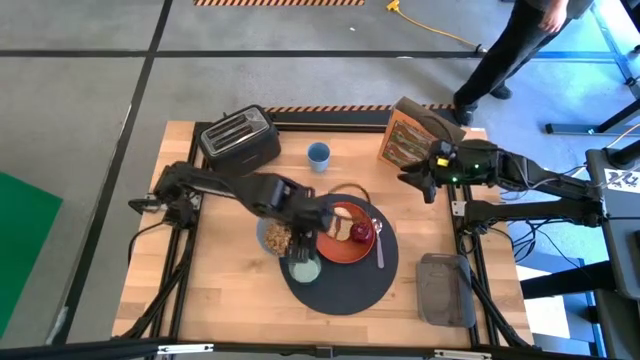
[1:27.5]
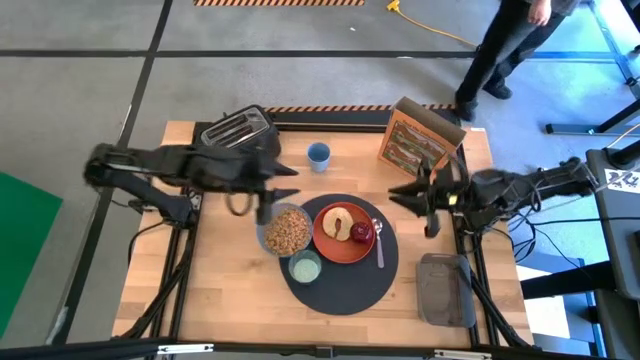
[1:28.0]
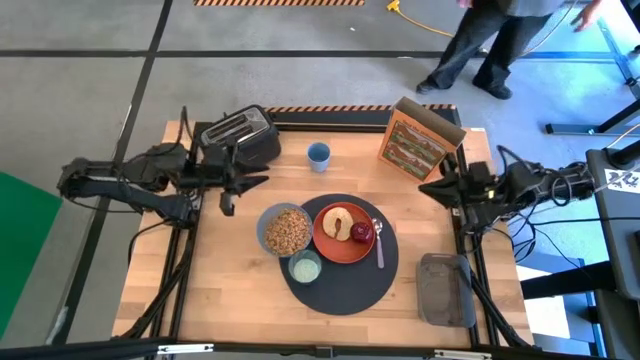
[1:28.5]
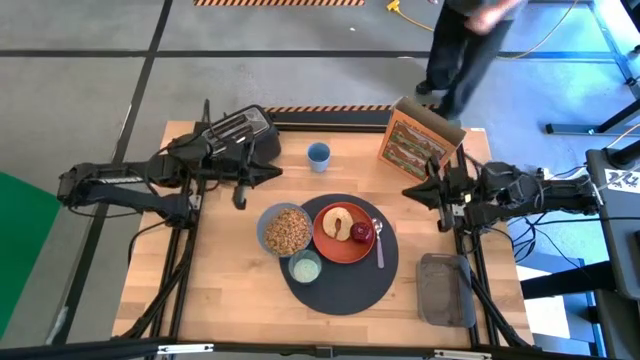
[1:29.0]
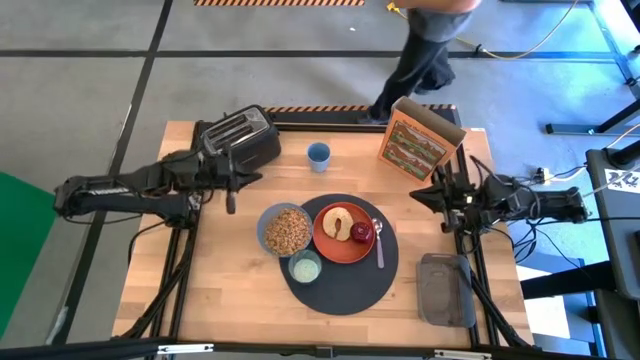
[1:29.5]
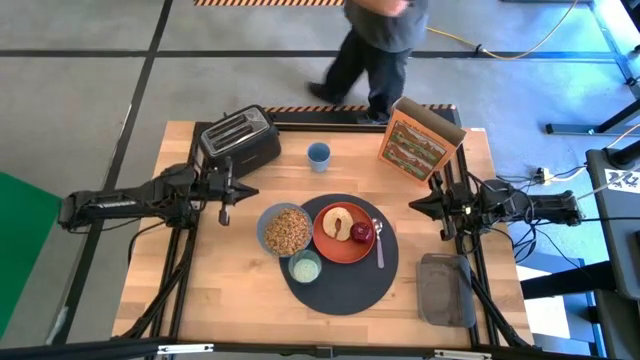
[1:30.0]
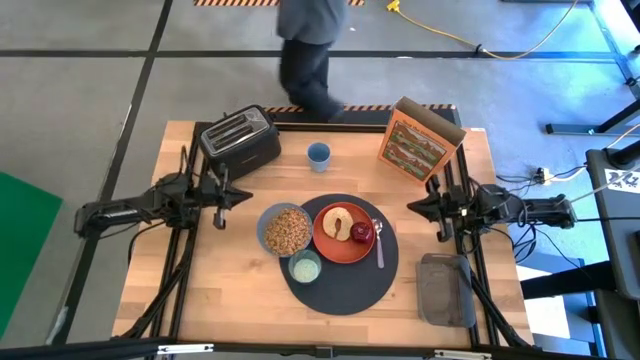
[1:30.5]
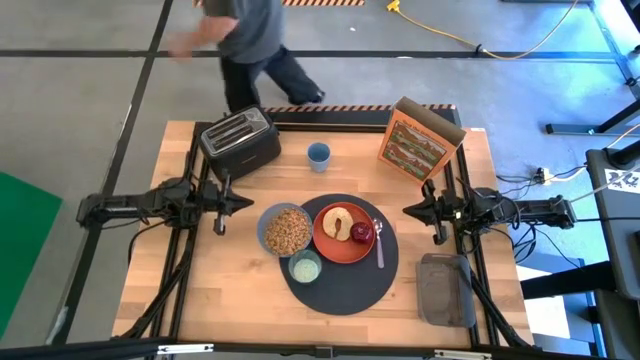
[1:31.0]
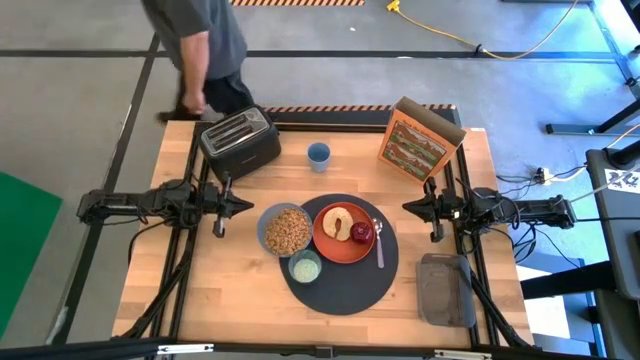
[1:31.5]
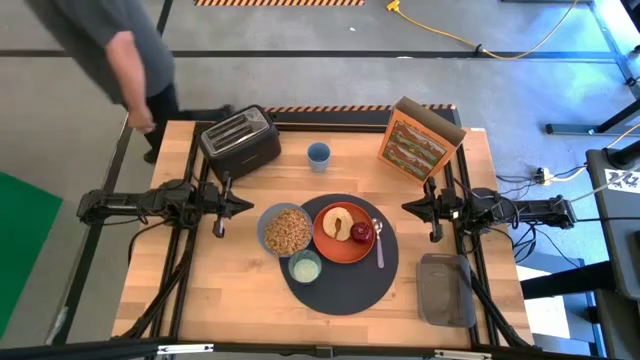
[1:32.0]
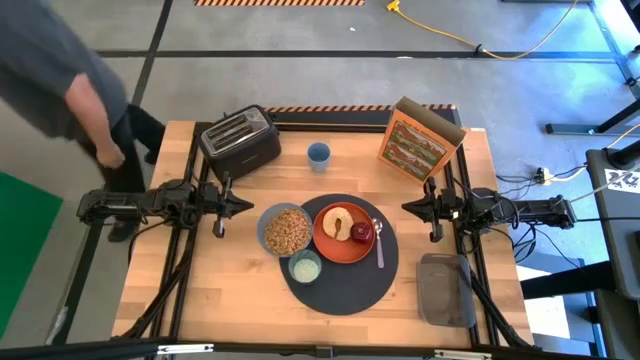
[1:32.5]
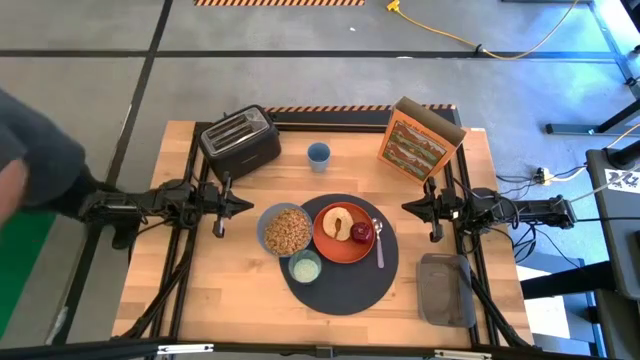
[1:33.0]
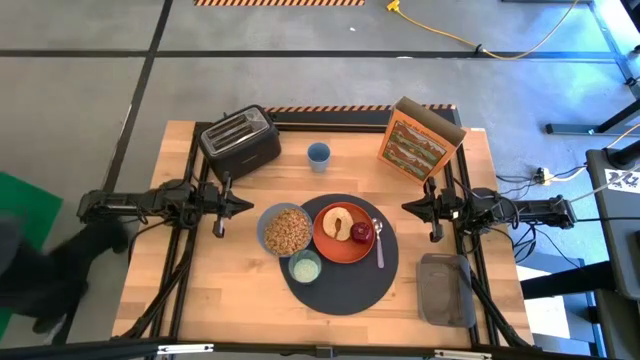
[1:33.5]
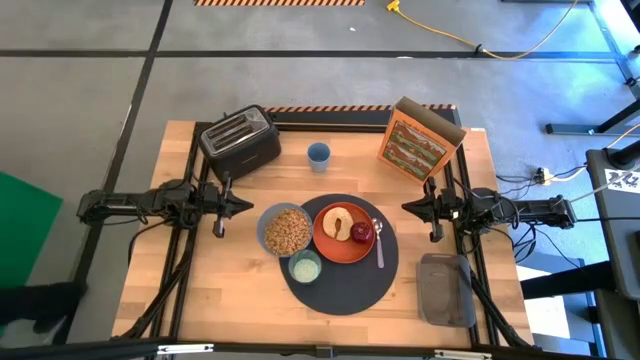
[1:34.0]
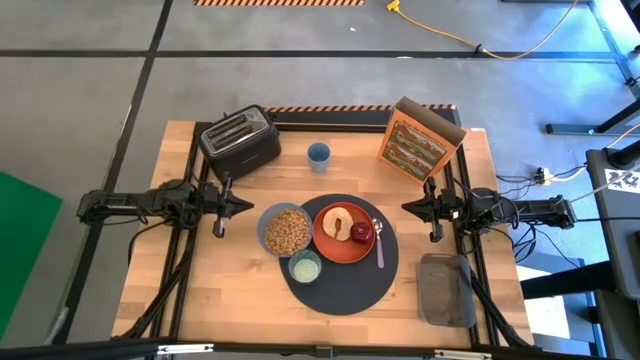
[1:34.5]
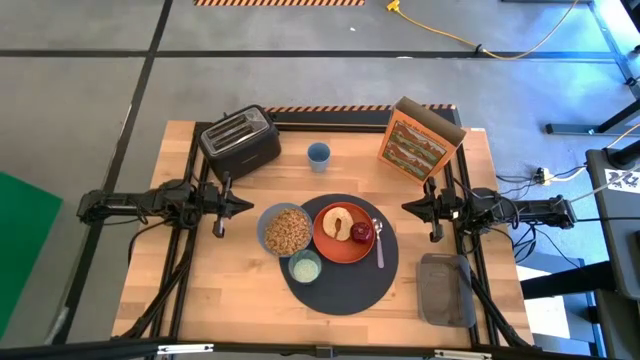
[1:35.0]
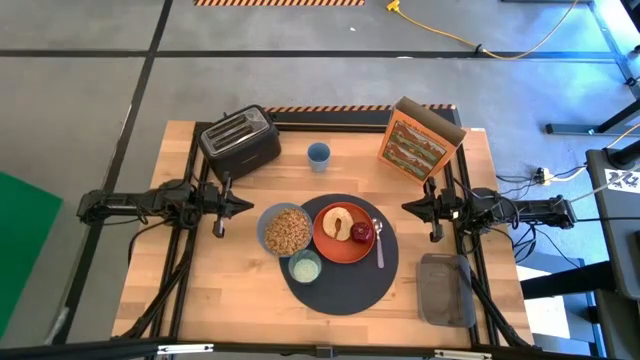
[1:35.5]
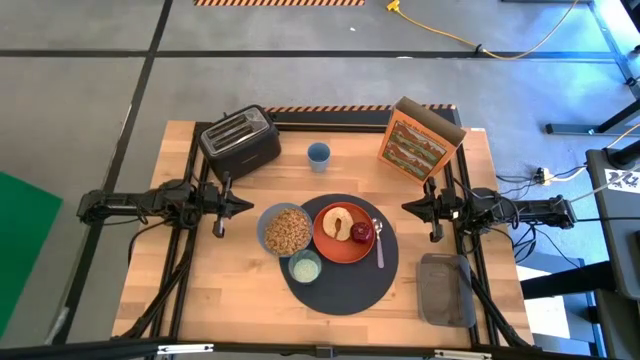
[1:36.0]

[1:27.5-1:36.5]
Task: Arrange a breakfast setting
Return to Home Position

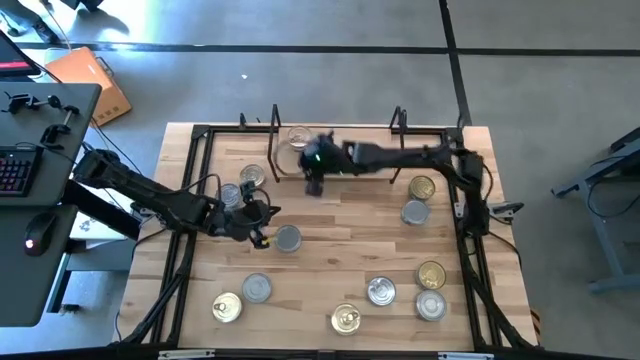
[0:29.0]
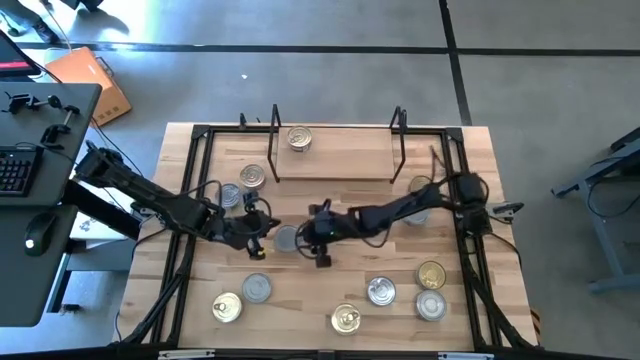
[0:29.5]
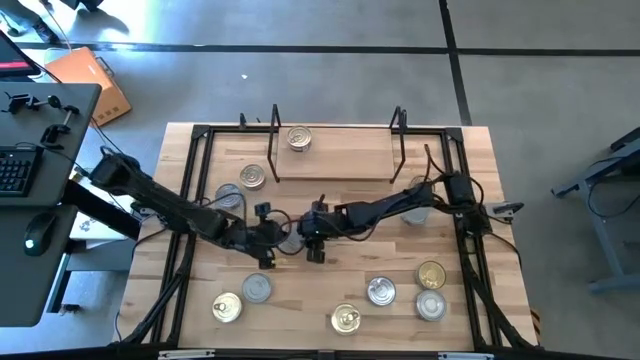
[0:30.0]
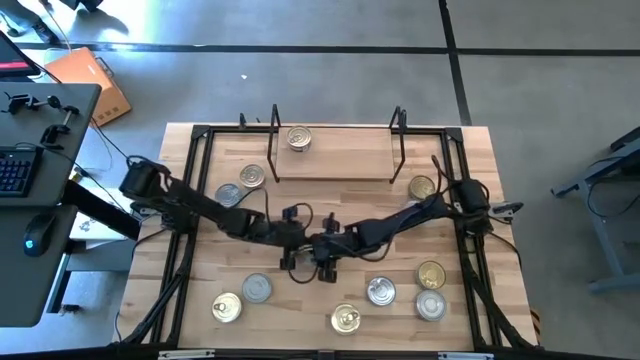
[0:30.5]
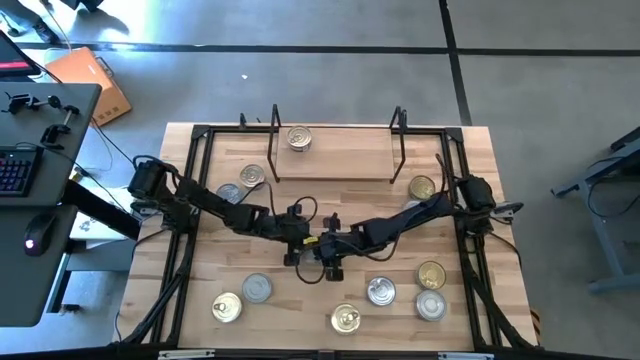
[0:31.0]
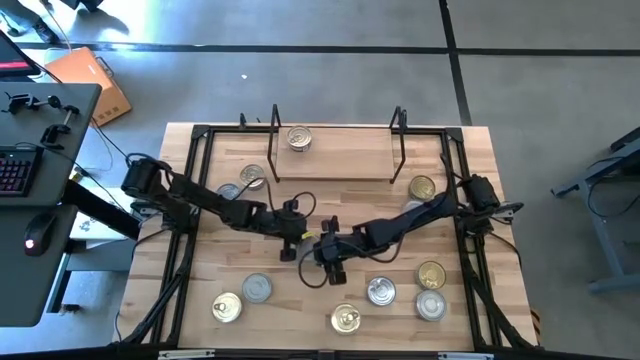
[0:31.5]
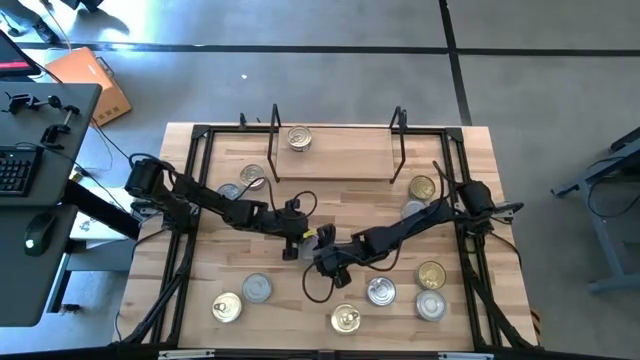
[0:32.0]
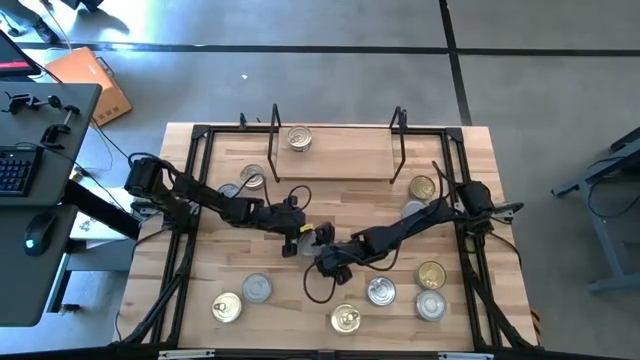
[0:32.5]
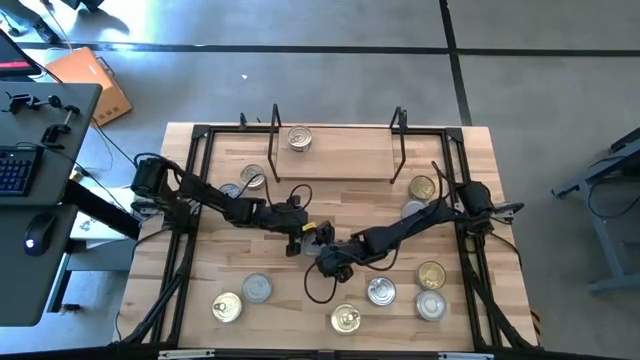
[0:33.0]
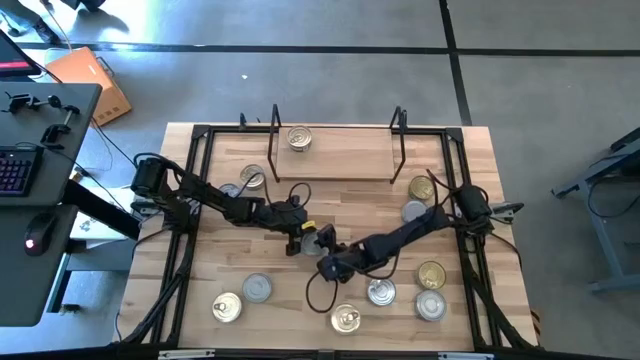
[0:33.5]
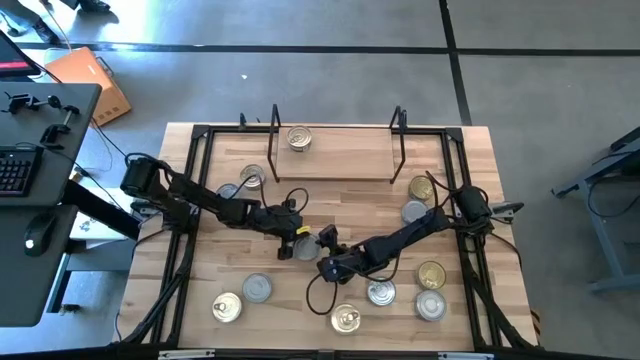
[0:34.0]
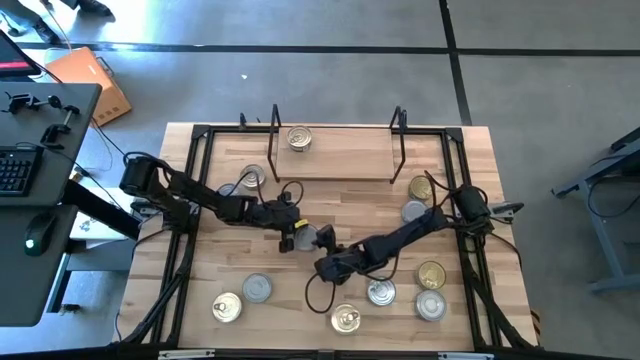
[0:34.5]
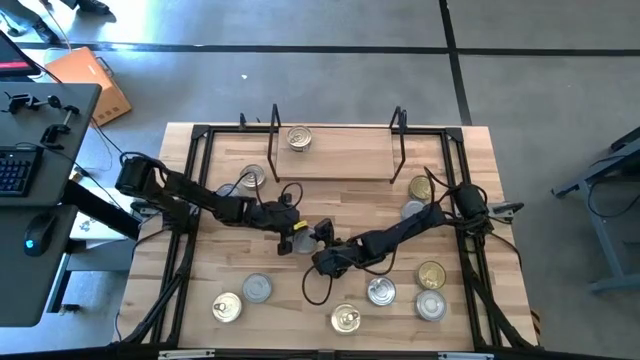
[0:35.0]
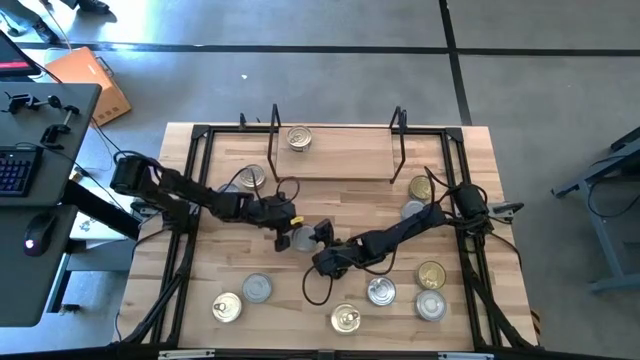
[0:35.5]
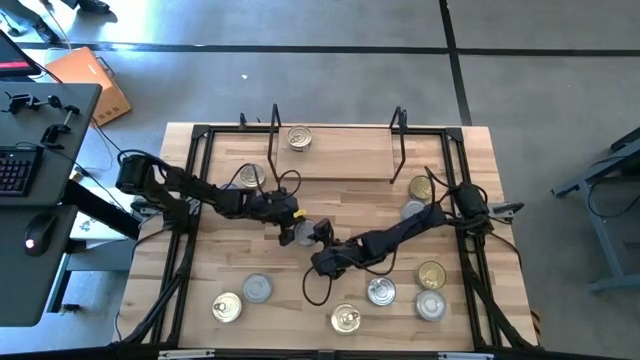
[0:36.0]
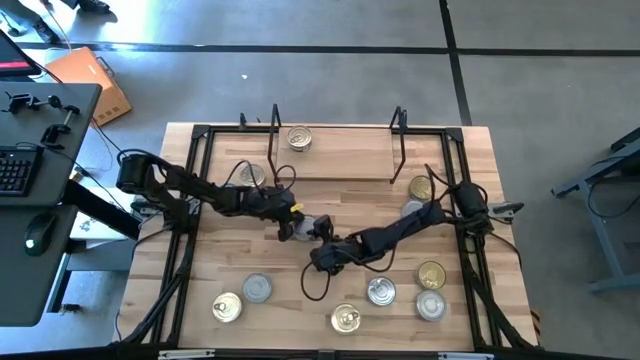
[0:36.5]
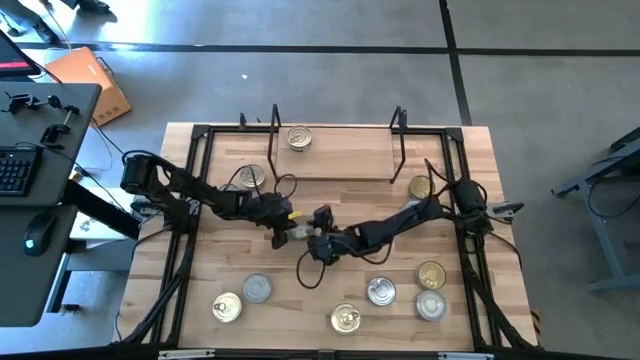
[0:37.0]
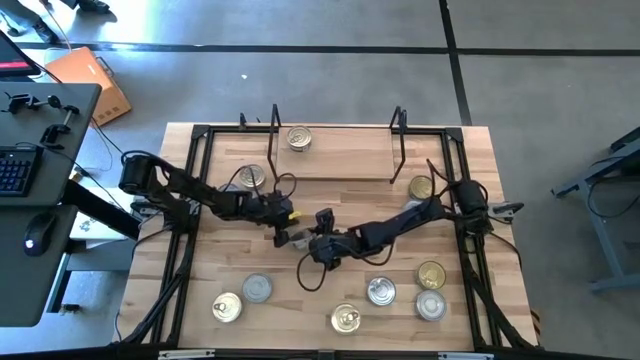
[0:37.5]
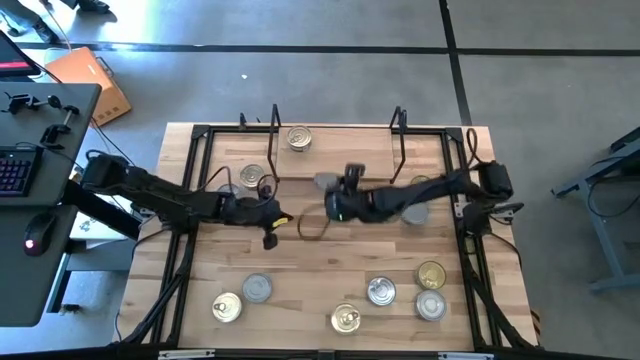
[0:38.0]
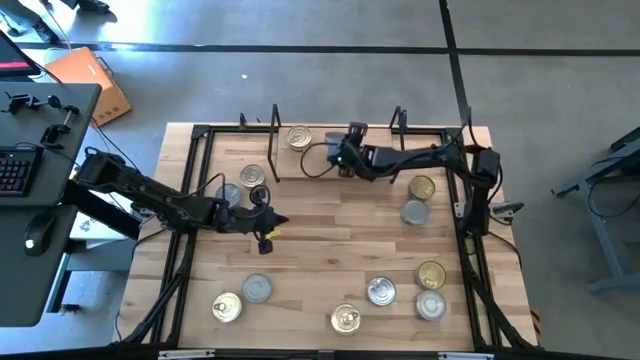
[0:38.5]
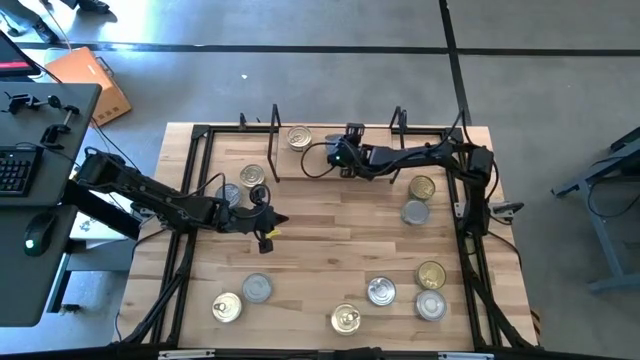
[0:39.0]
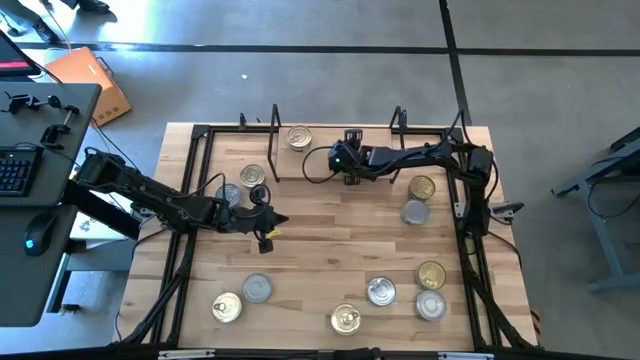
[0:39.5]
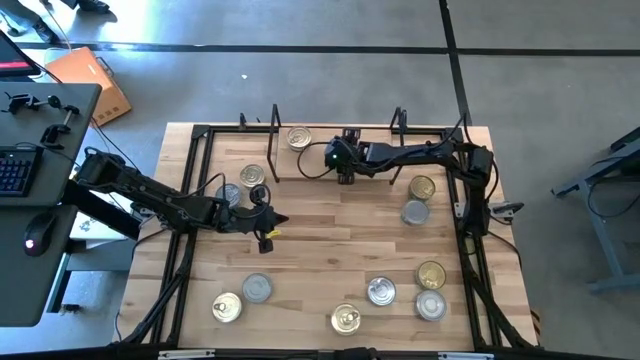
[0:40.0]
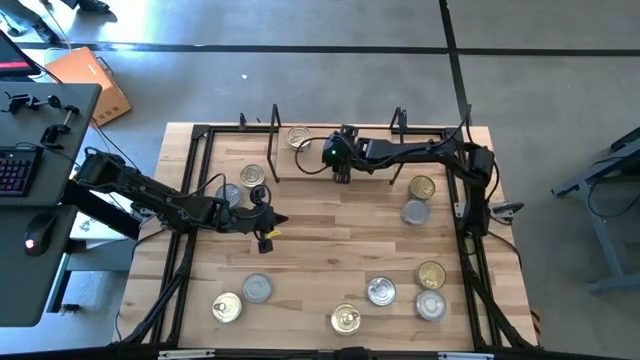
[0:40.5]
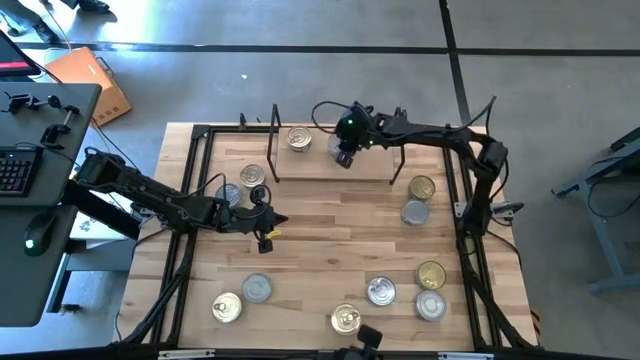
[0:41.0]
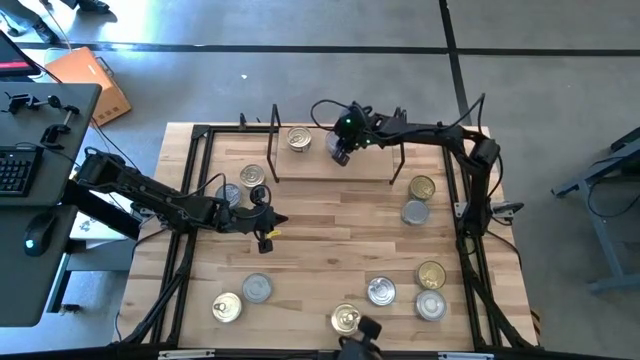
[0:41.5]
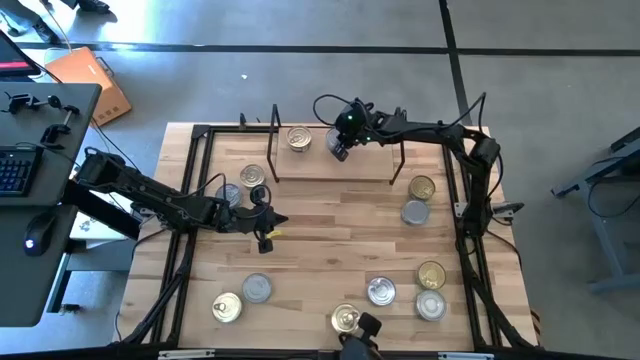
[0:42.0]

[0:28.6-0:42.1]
Task: Stack canned seafood by type on shelf
Put the green tuna can on the shelf
